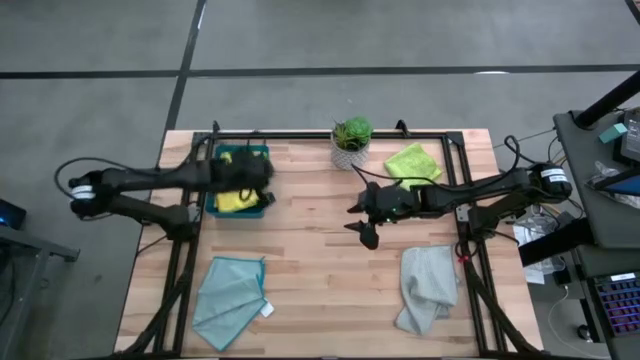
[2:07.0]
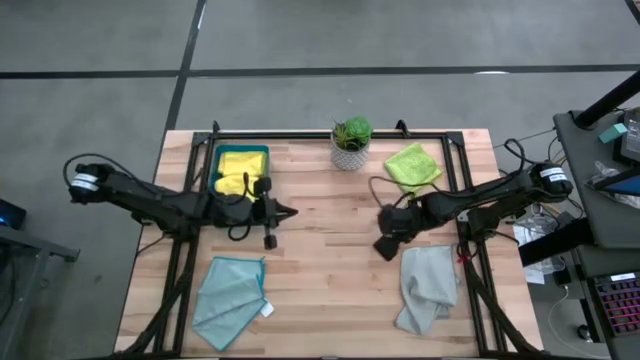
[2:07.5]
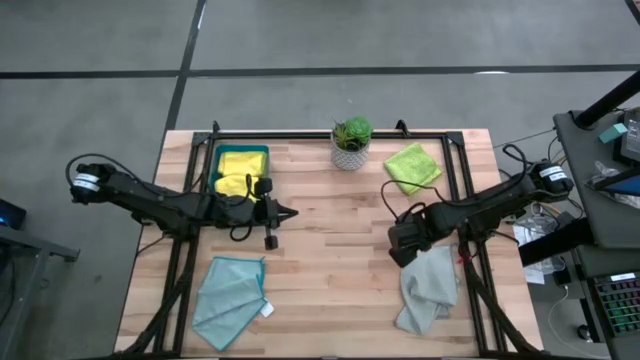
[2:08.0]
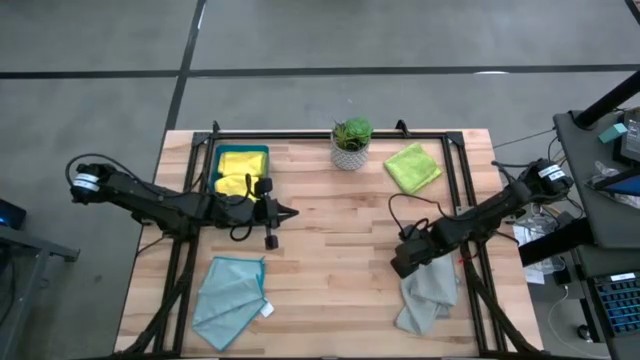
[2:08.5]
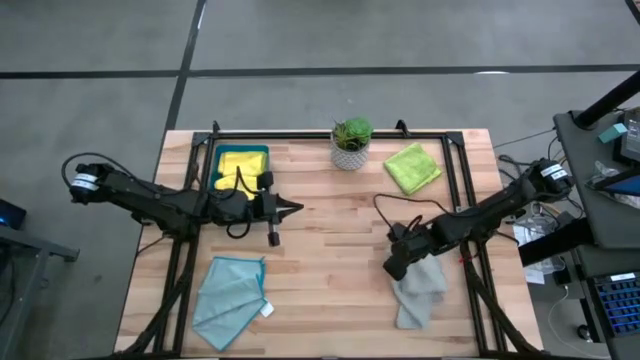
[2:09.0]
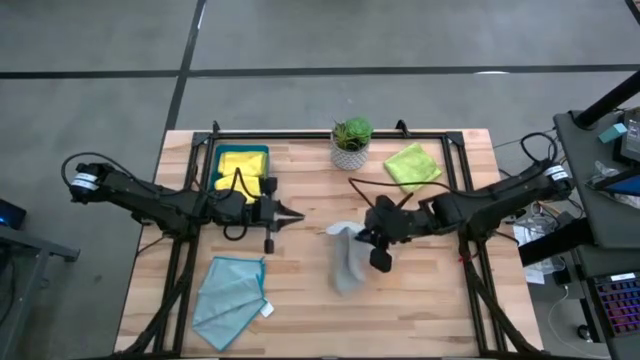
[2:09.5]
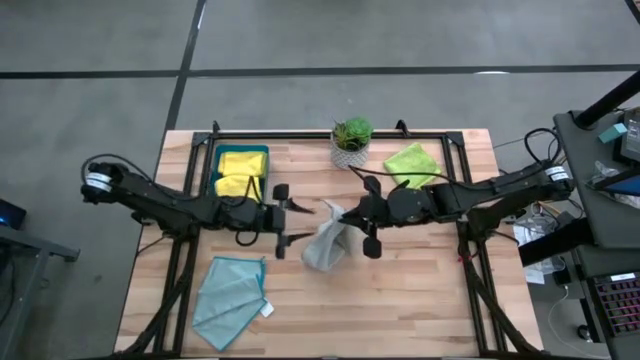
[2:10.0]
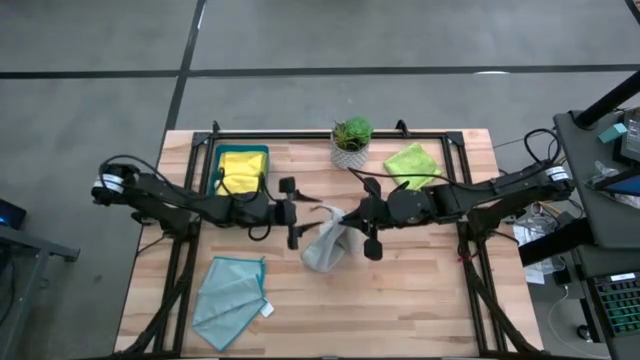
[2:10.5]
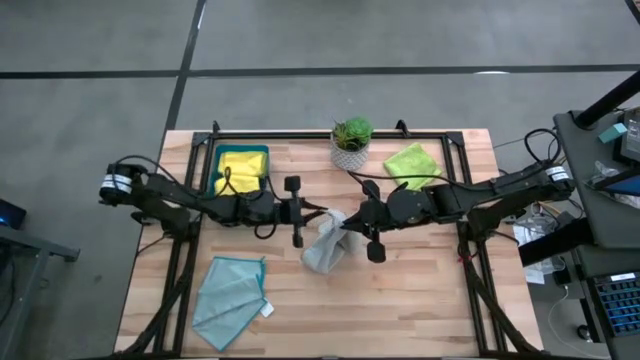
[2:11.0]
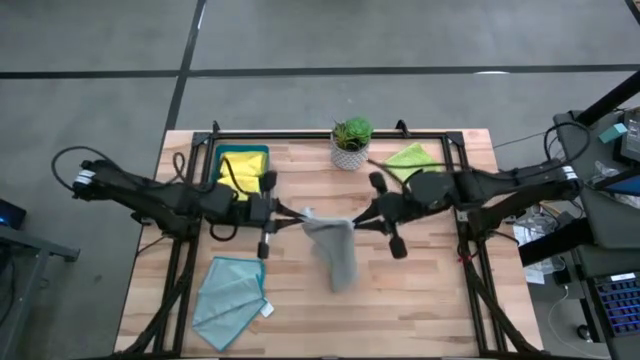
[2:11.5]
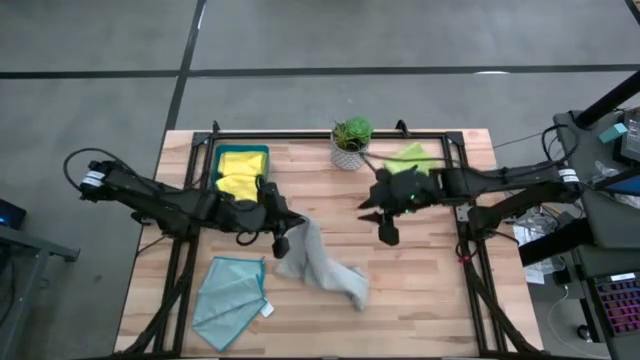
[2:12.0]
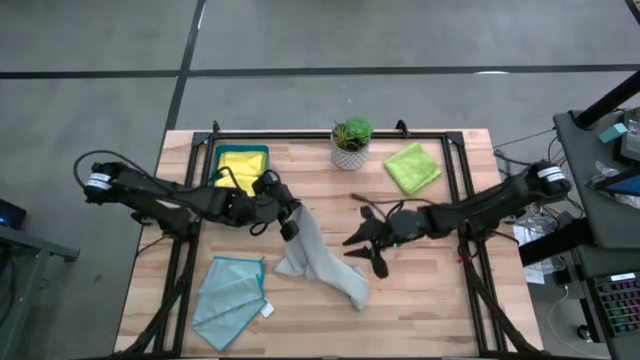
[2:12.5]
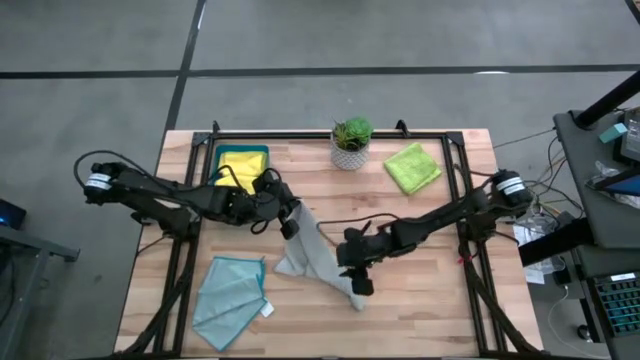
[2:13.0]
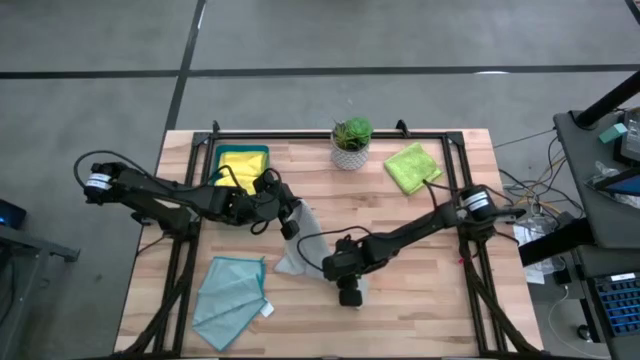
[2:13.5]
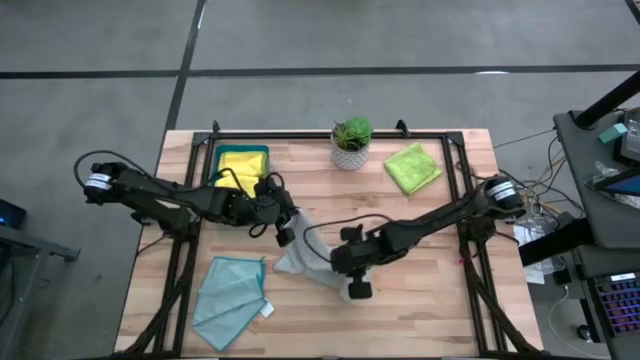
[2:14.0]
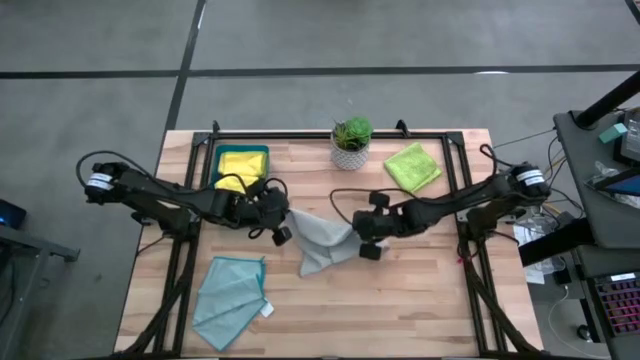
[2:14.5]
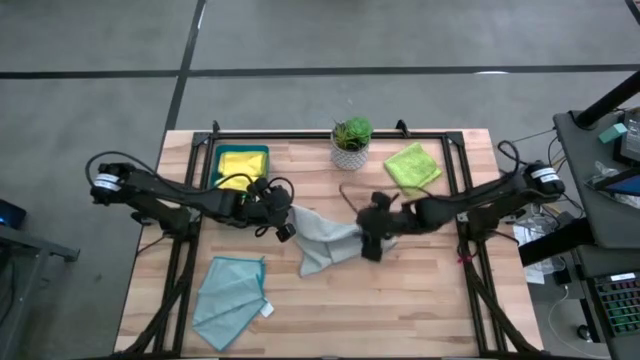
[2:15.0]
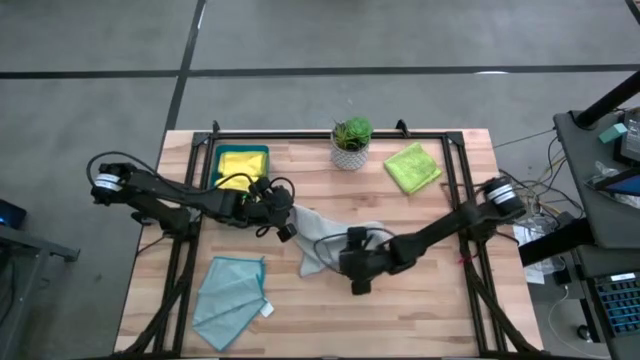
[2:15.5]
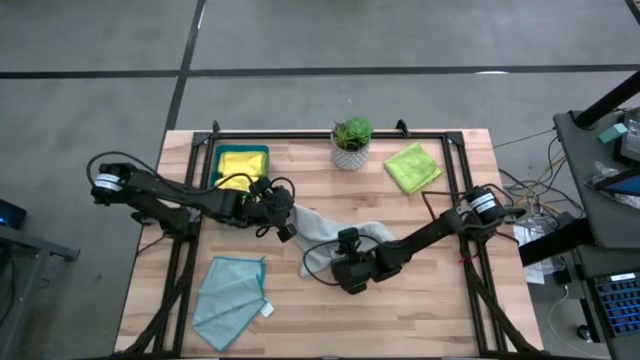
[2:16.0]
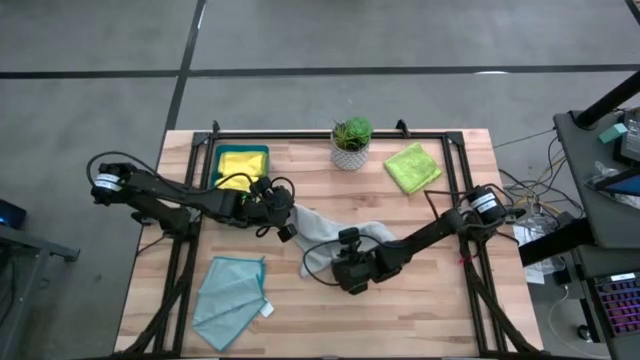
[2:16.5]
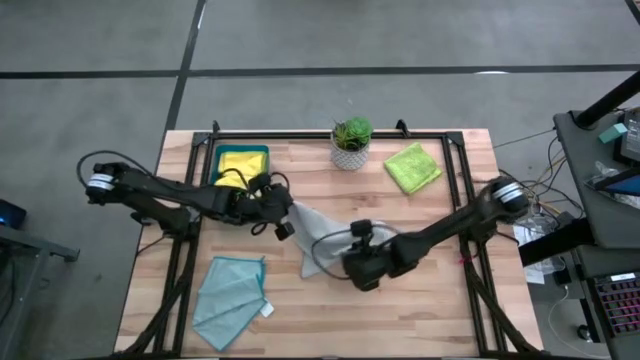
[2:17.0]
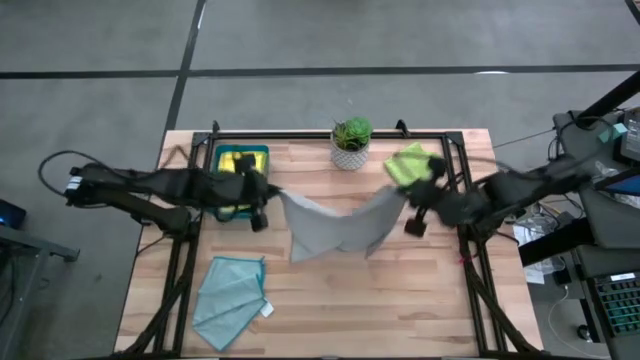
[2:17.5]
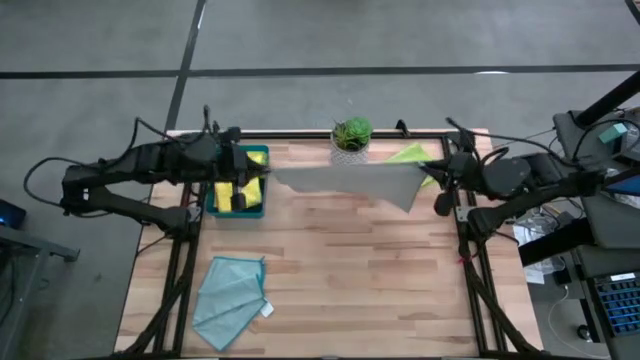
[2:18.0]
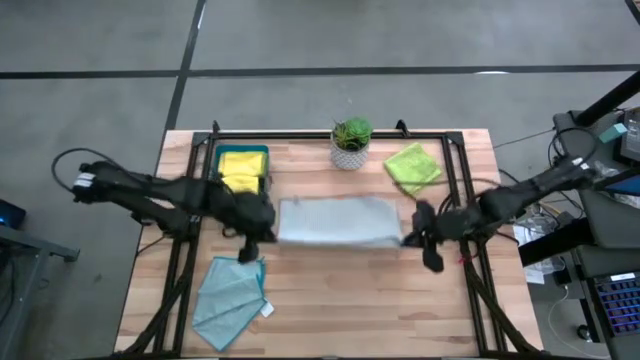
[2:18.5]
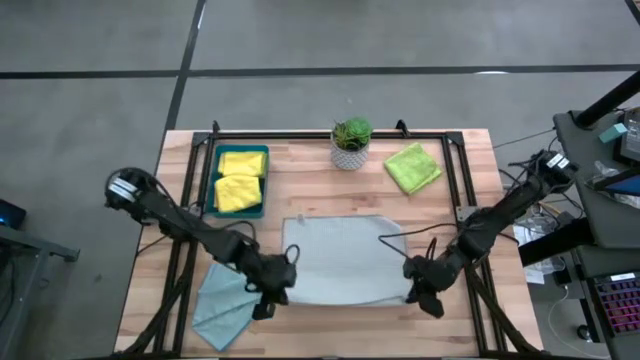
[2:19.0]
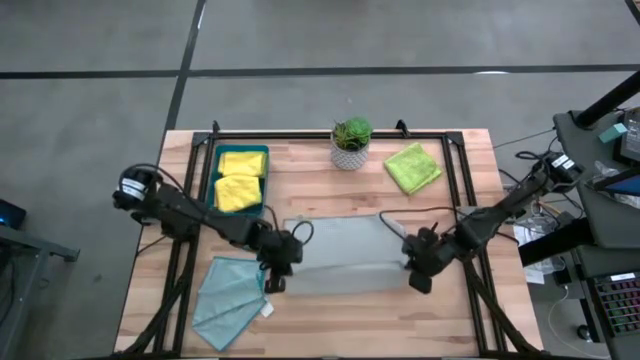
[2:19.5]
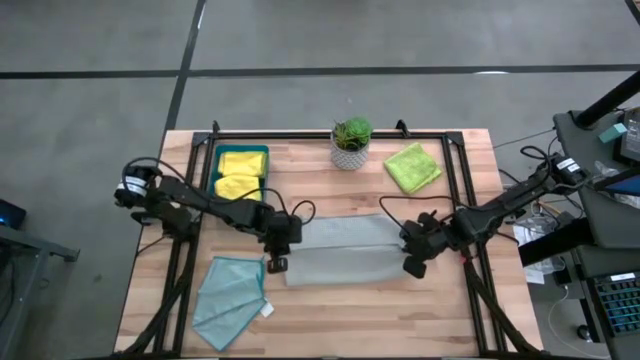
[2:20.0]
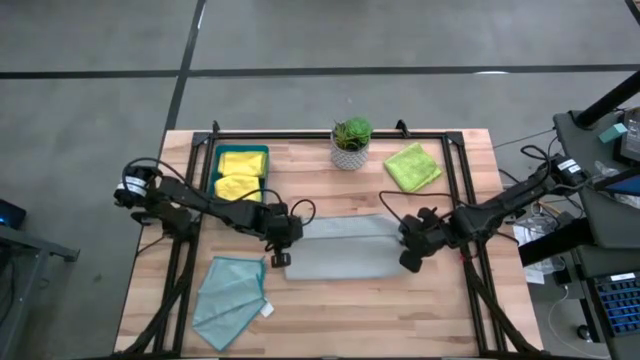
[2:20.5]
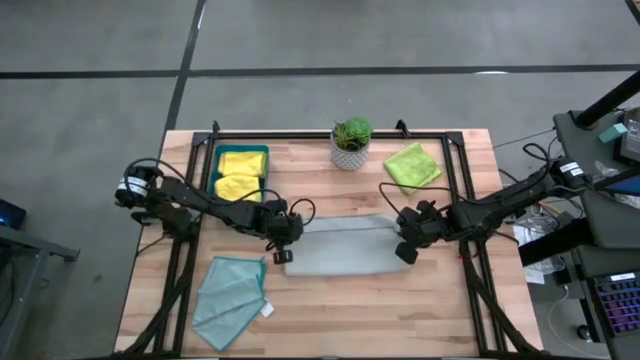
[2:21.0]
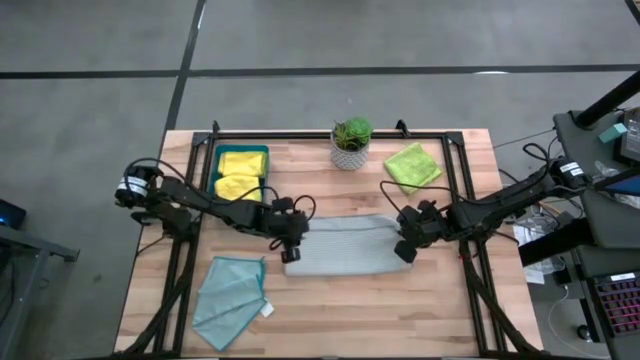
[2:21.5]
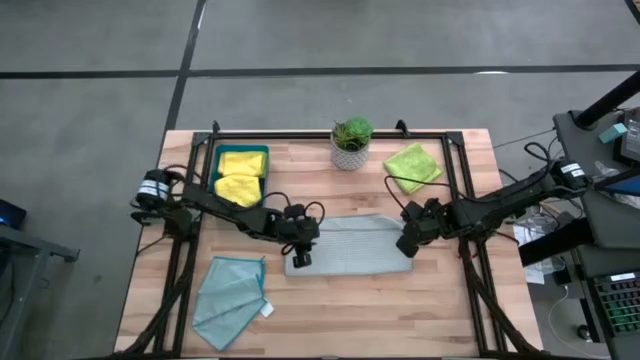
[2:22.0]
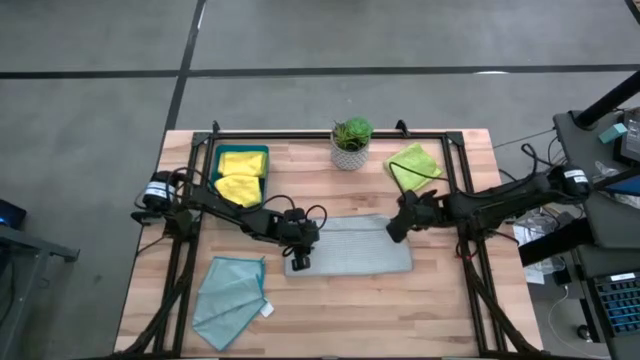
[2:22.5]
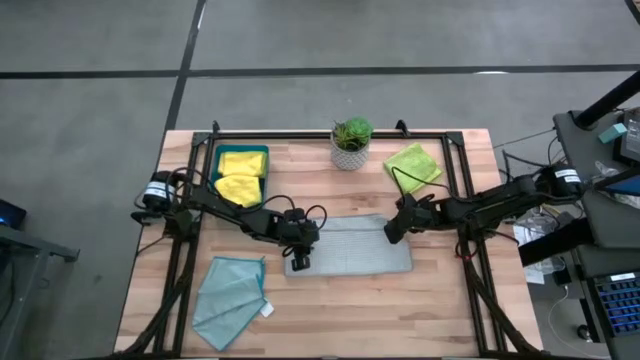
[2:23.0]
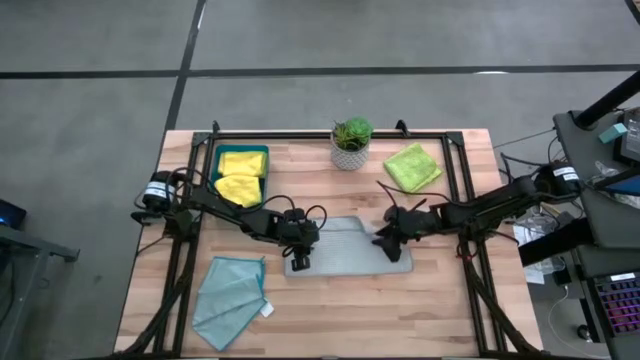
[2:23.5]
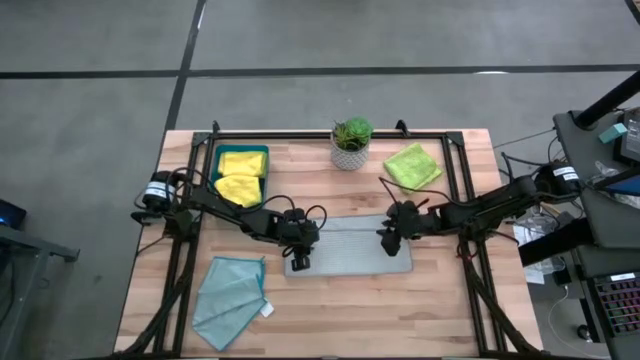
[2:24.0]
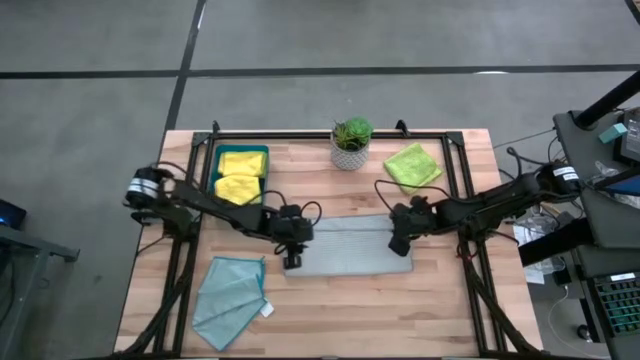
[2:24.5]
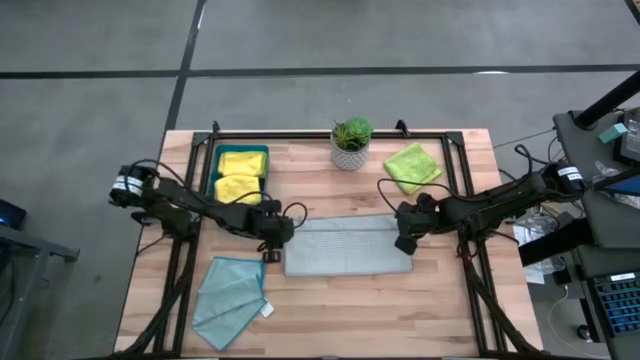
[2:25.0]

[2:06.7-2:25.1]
Task: Fold microfiber towels
Fold the gray towel

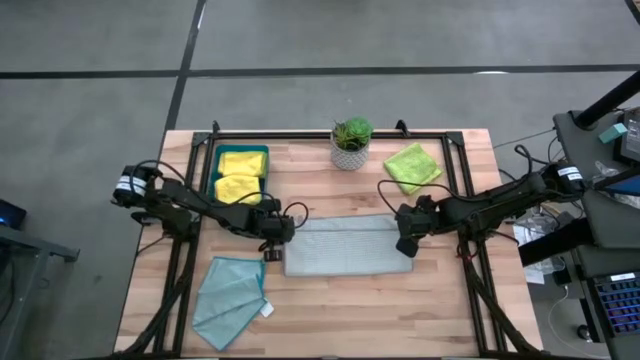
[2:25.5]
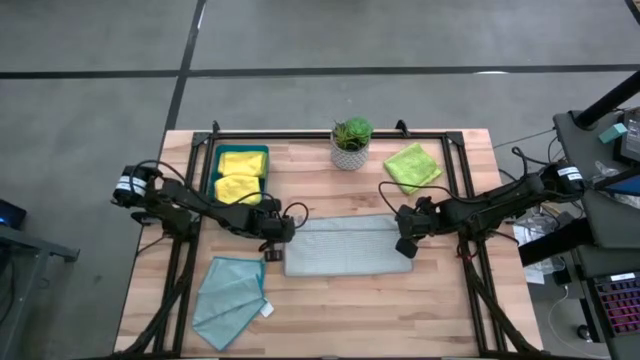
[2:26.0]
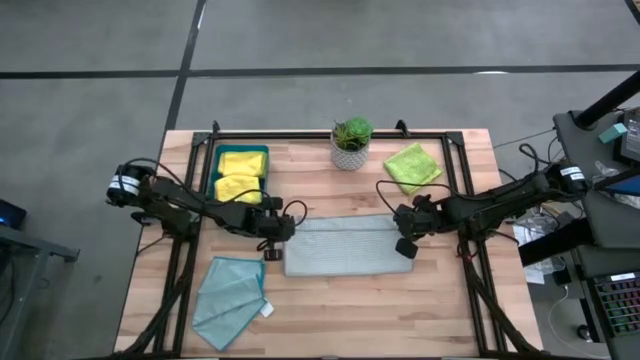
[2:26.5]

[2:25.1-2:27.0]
Fold the gray towel

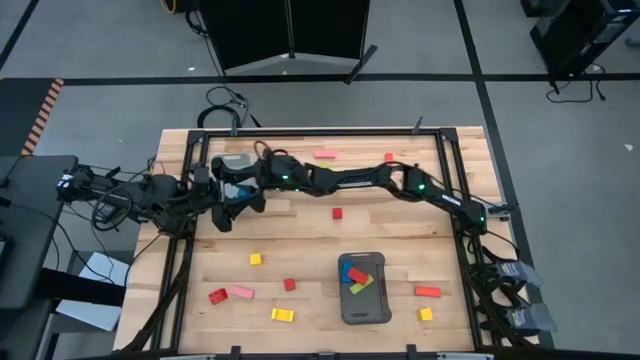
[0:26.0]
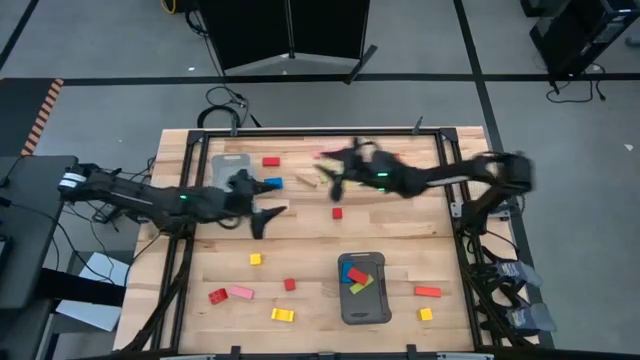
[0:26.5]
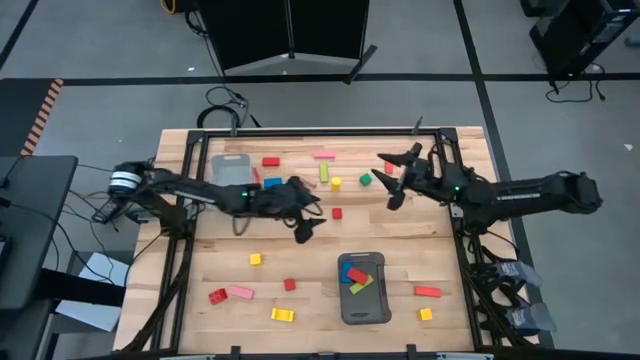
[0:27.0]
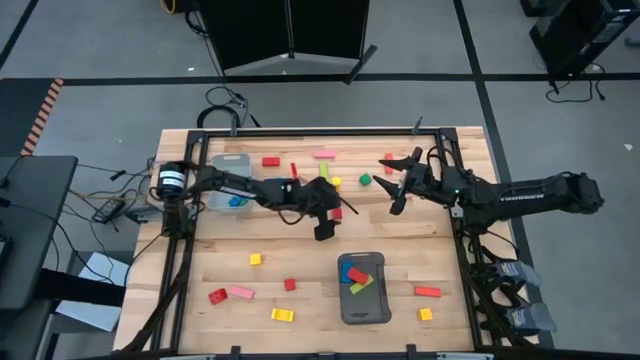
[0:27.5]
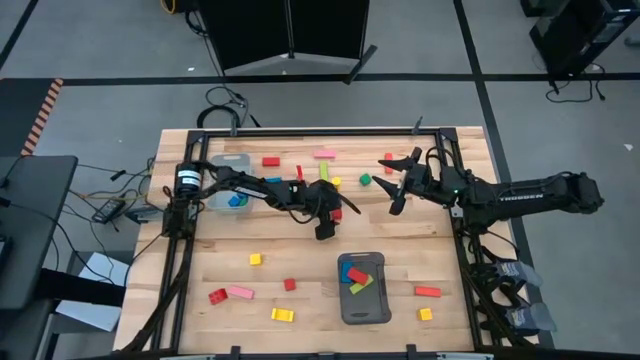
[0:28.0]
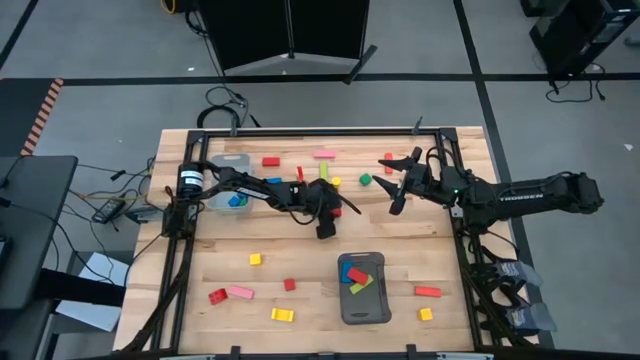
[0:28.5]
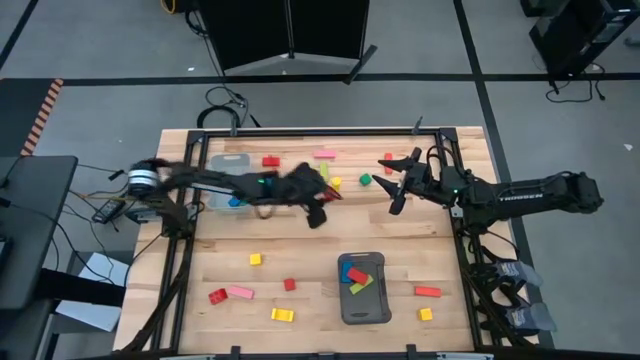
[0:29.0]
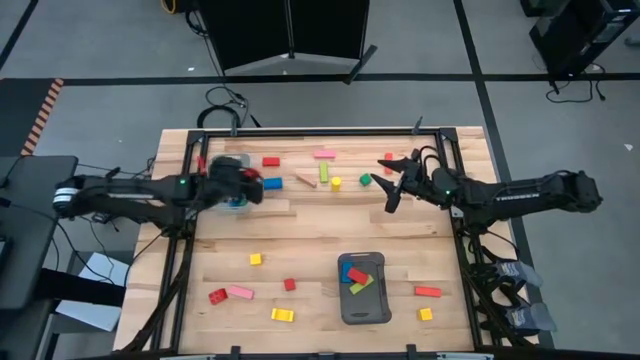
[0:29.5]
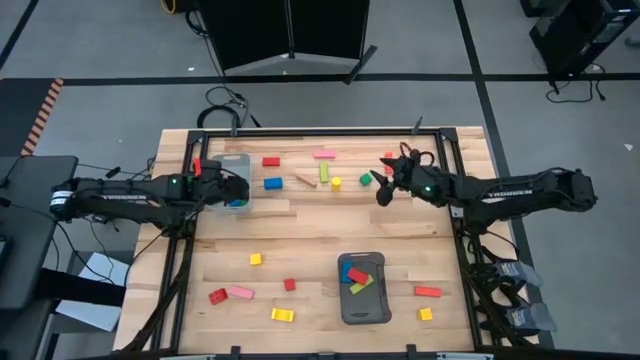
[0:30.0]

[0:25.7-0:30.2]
Task: Sort blocks by size
Put the red cube block into the gray bin
